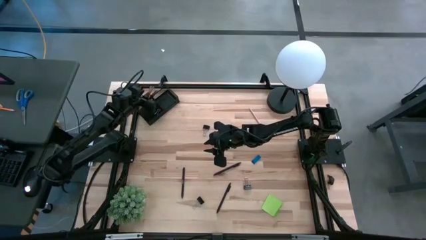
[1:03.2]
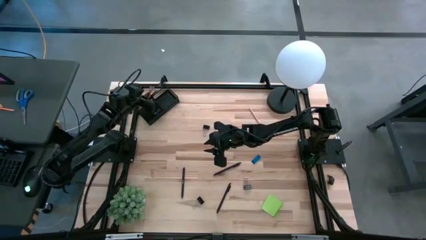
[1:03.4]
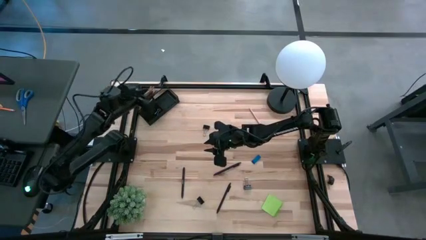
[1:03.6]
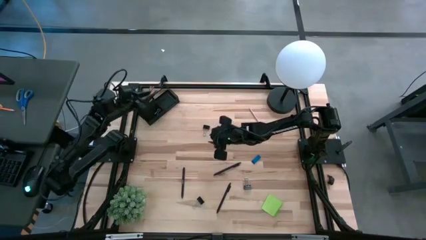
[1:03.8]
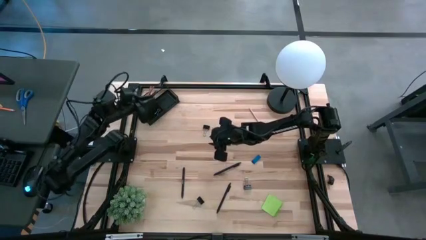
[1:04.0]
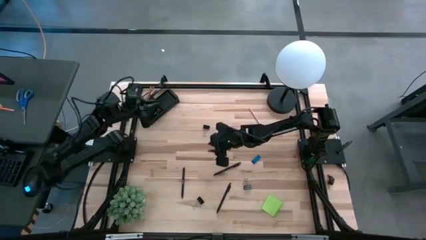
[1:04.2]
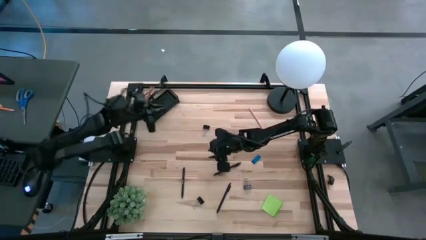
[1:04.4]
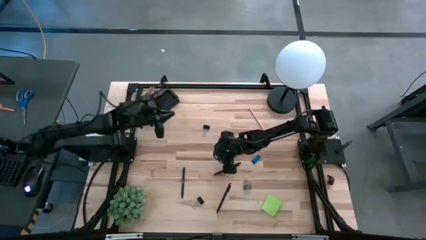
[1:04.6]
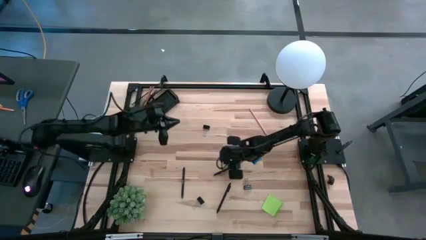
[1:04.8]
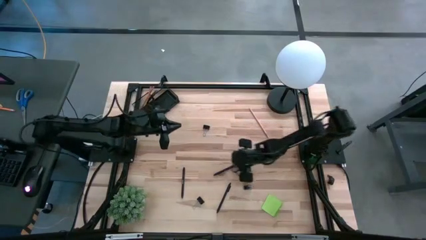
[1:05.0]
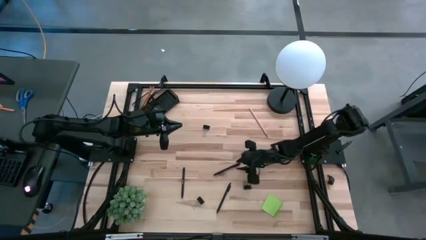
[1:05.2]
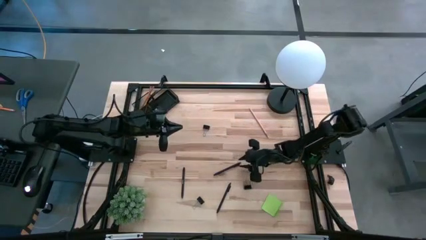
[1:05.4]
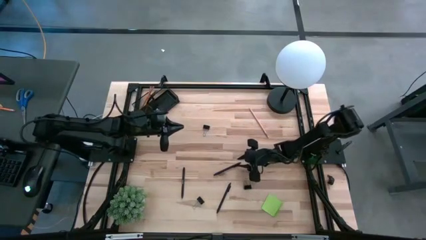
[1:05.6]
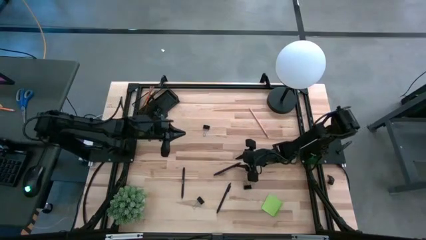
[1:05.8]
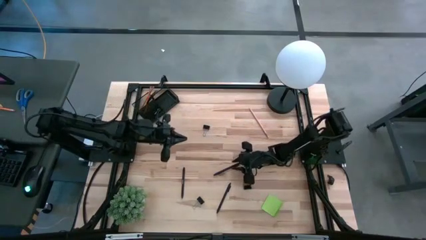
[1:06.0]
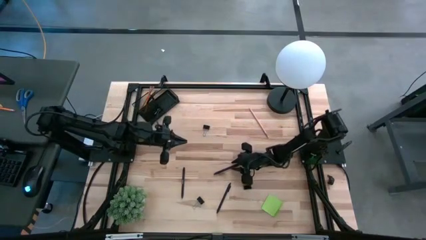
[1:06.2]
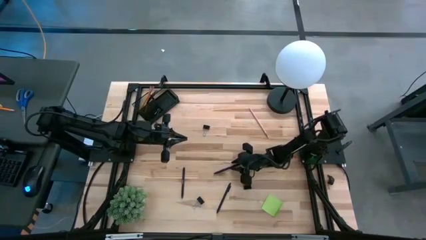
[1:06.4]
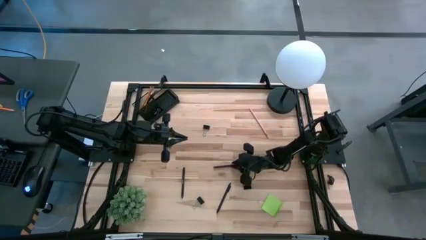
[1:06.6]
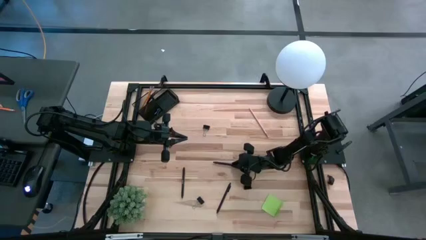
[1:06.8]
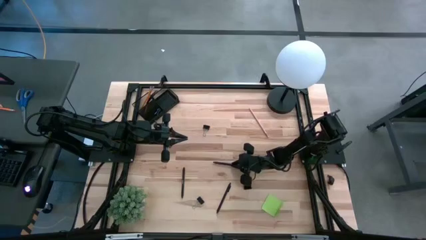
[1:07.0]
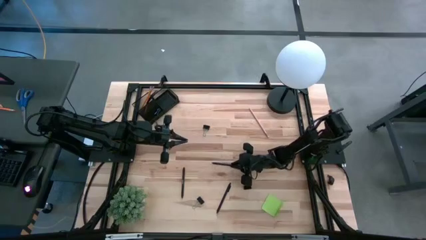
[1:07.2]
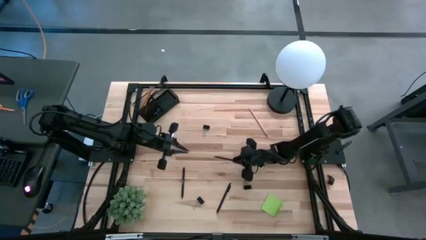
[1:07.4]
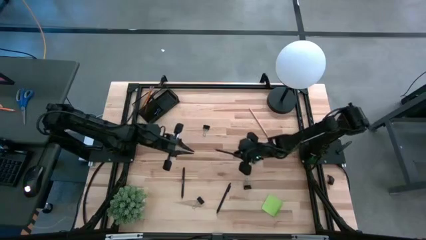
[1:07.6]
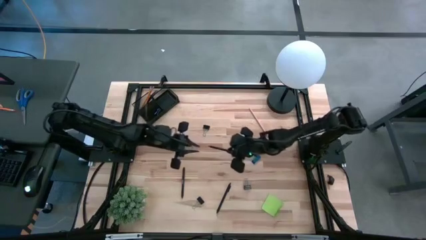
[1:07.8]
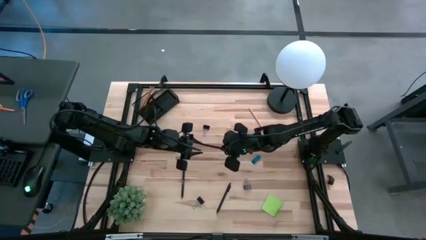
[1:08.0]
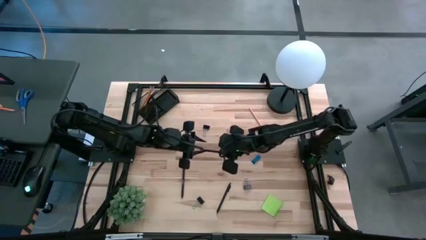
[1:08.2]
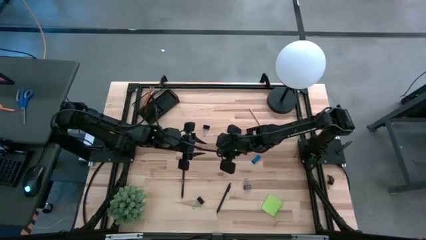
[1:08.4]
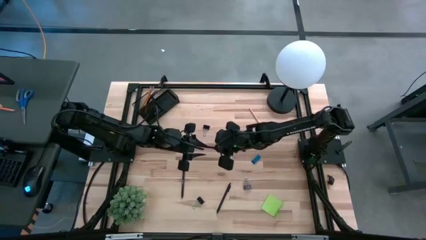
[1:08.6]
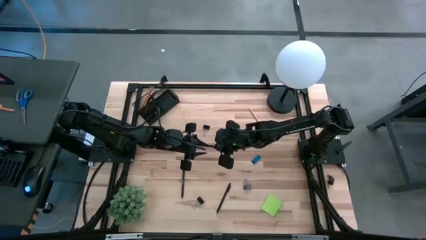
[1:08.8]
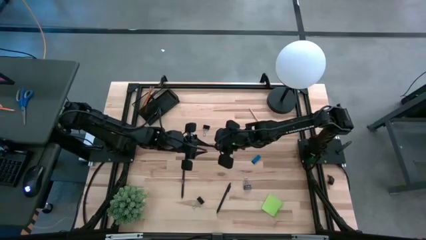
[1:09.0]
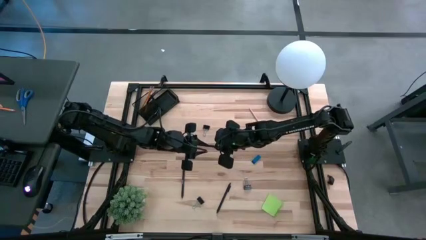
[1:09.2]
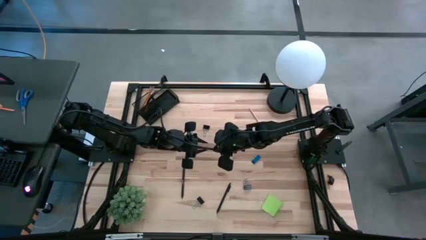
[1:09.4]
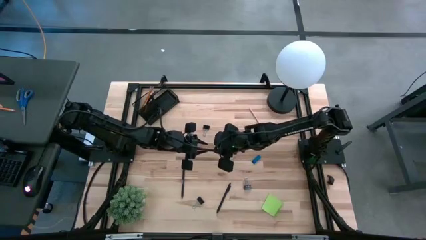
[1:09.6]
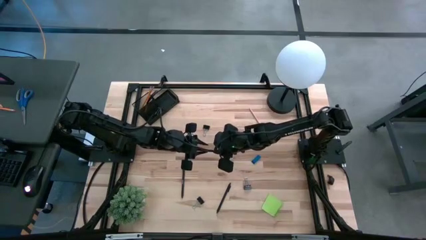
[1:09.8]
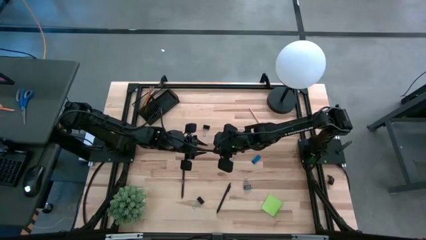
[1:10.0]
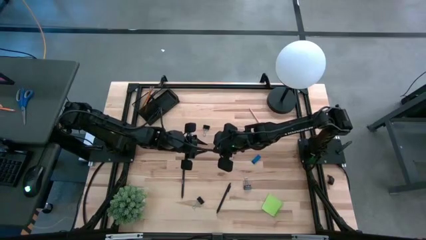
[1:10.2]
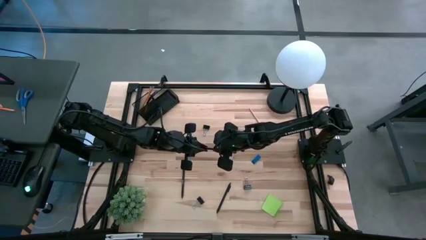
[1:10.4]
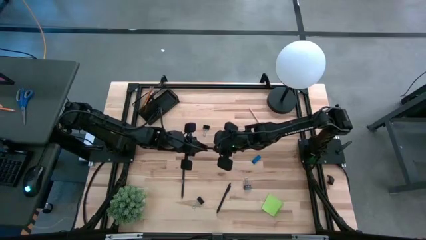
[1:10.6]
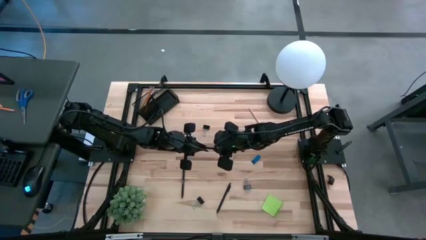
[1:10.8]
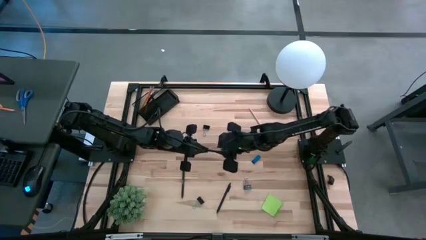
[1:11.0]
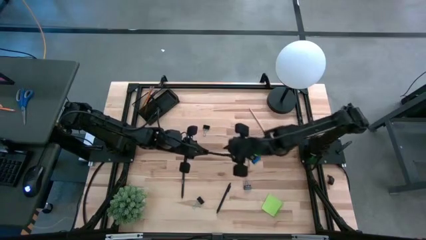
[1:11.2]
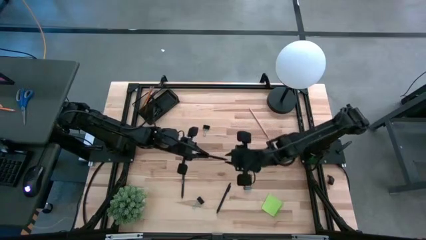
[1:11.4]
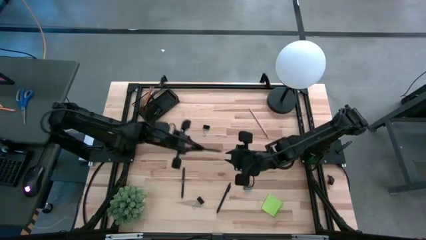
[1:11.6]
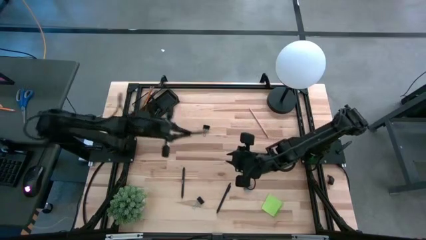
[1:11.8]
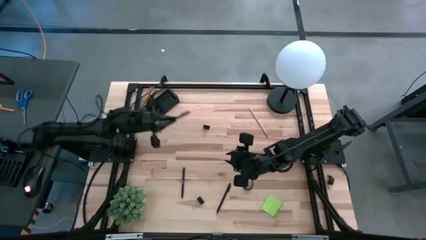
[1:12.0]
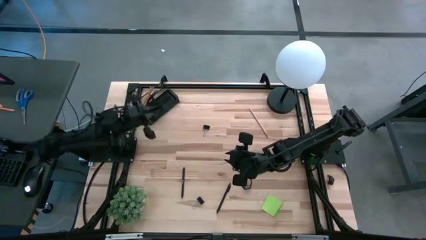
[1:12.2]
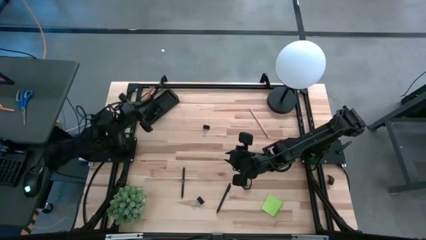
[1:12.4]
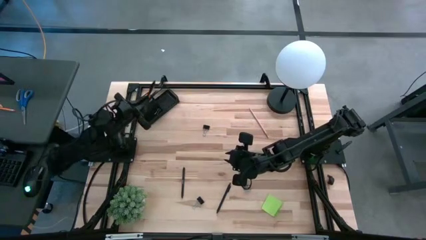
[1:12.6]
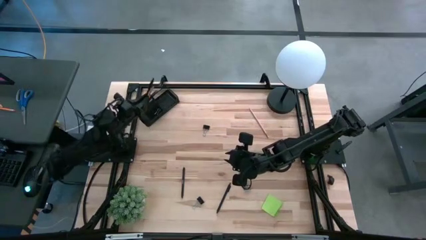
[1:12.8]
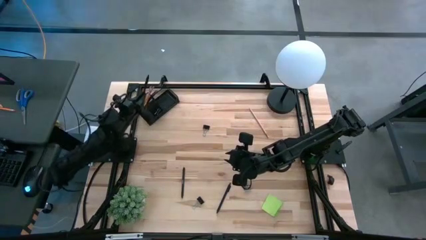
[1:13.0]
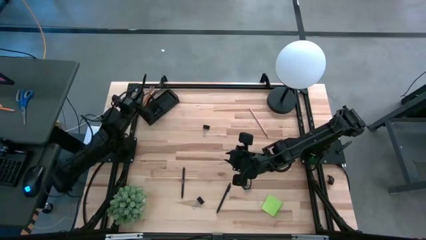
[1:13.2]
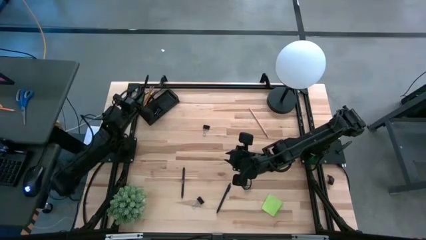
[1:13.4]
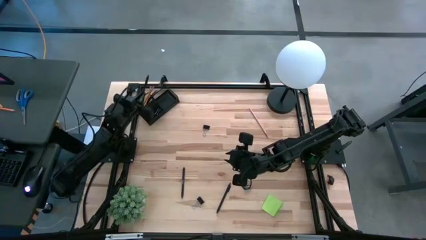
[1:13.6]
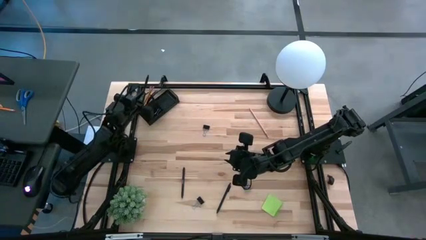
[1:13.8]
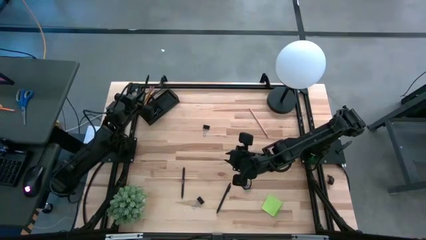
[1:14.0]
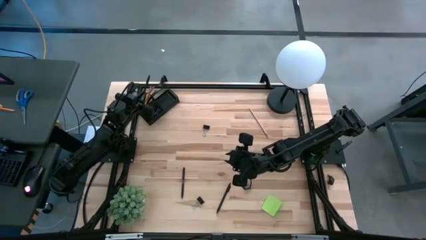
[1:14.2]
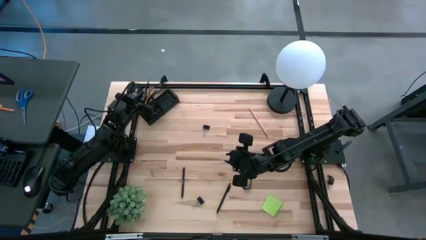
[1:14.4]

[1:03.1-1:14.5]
Task: Pick and place office supplies into organizer
Put the black pen into the black desk organizer

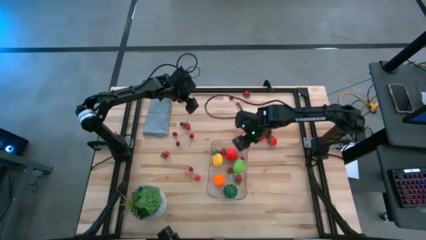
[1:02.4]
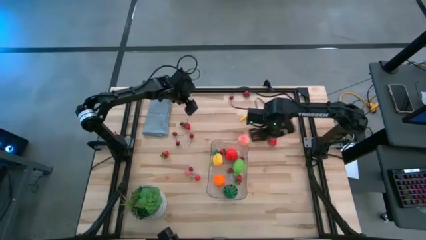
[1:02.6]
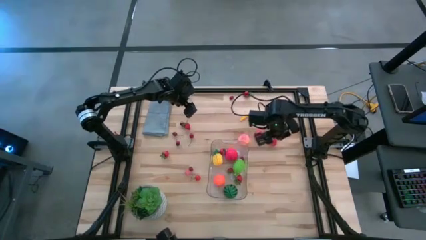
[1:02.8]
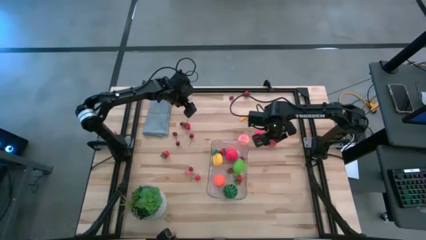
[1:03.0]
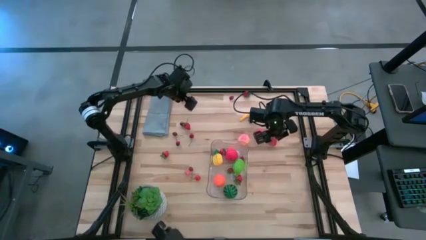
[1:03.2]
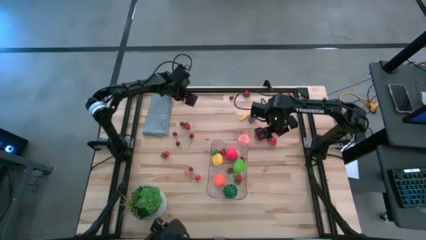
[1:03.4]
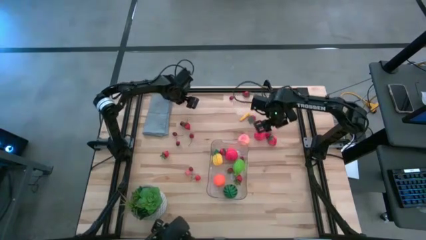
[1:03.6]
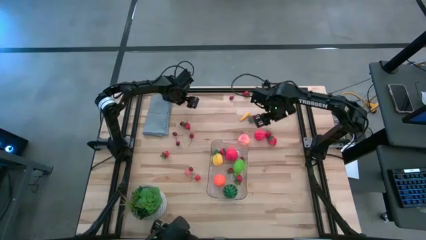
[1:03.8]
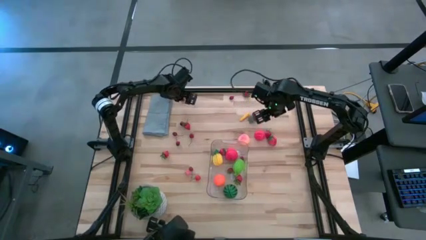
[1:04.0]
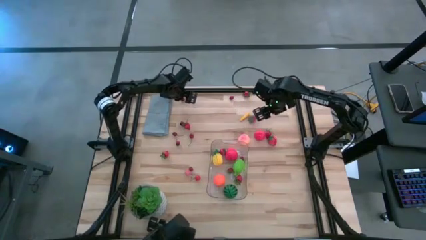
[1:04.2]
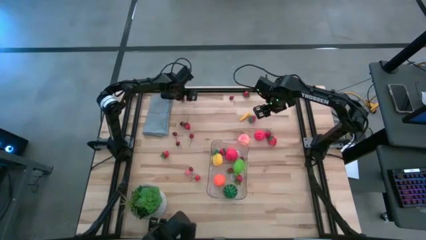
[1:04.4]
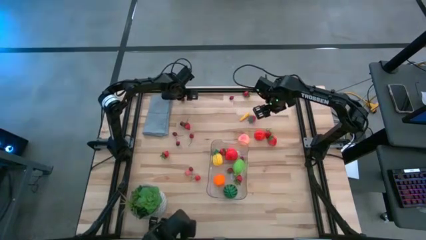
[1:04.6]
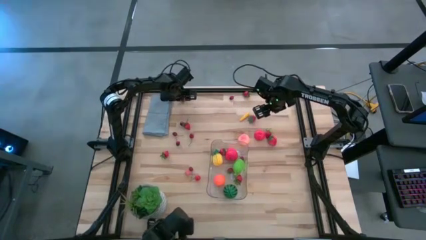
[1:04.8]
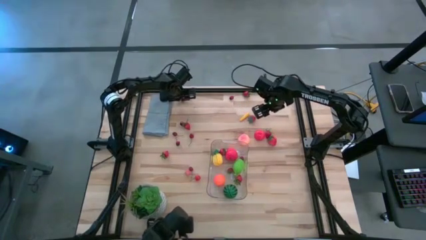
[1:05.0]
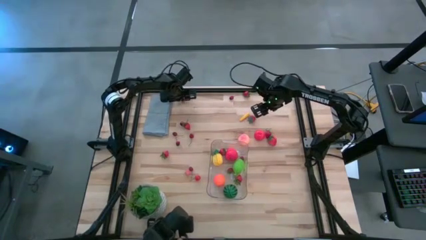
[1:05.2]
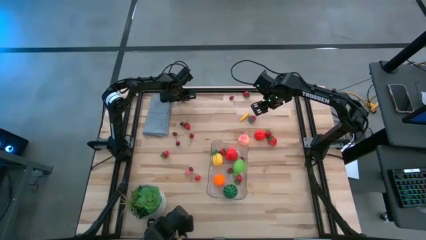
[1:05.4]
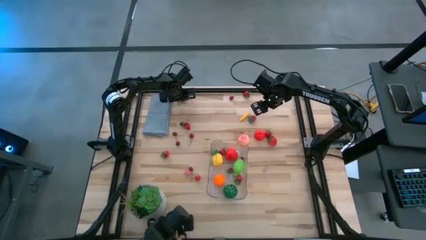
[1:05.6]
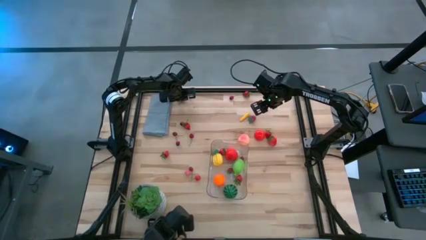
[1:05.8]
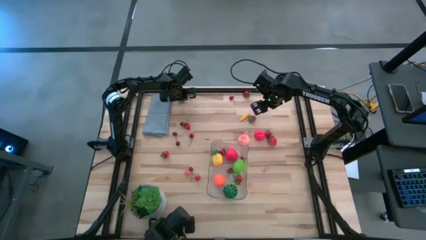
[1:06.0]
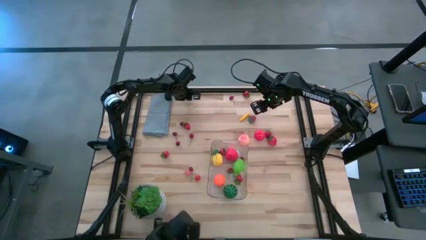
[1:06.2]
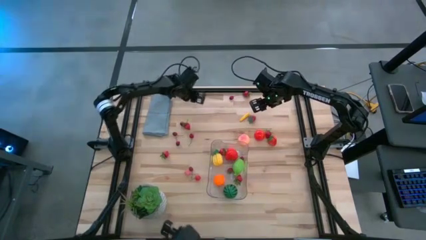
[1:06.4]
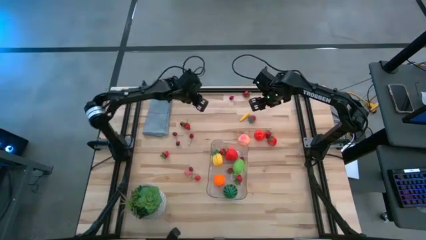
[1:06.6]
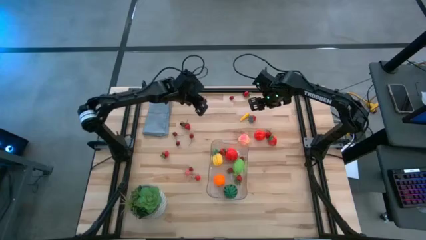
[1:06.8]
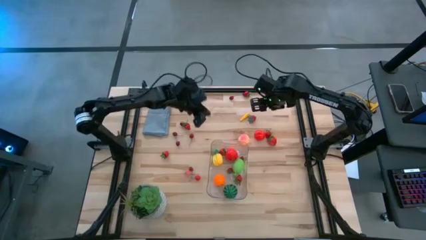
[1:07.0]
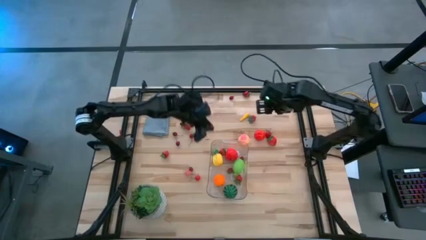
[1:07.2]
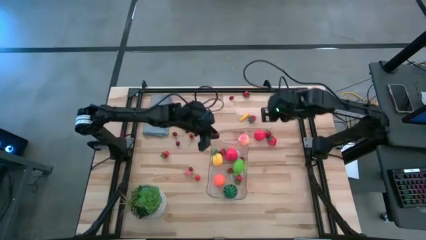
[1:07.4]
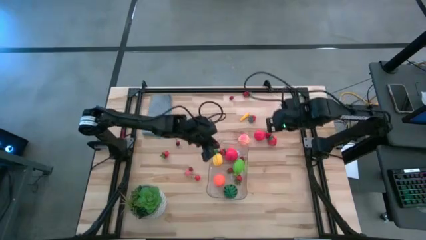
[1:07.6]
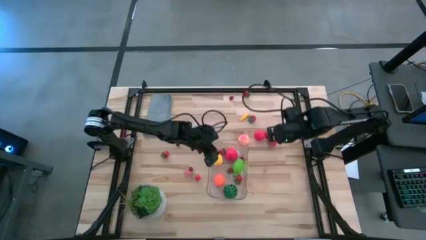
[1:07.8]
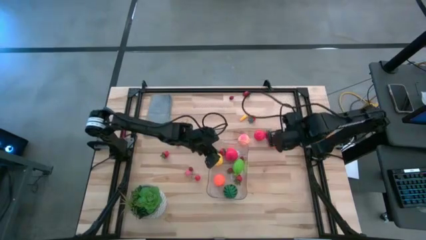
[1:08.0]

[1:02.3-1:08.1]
Task: Pick and placing Produce into tupperware
Put the cherry into the transparent bin
